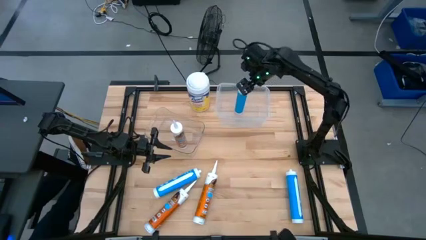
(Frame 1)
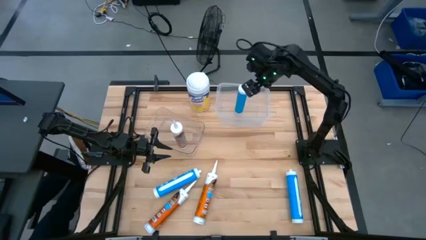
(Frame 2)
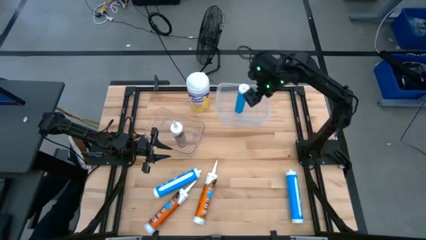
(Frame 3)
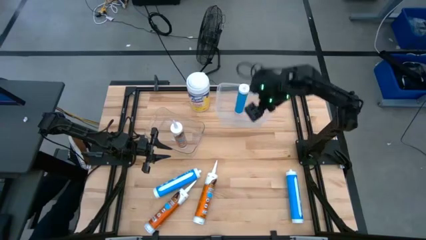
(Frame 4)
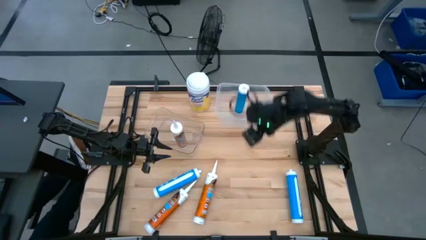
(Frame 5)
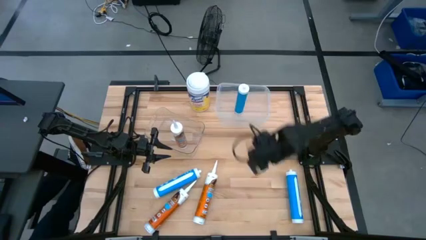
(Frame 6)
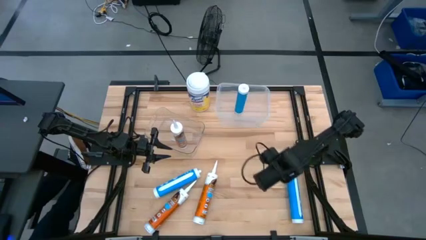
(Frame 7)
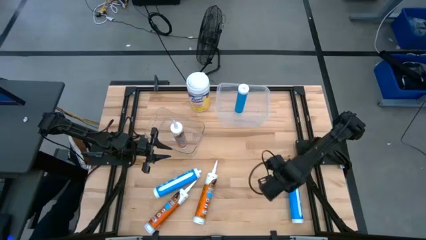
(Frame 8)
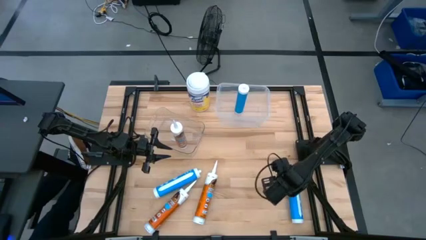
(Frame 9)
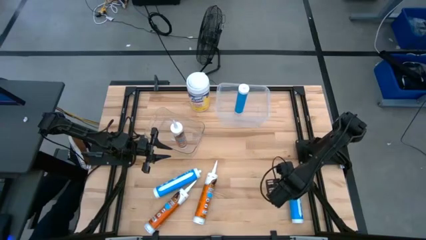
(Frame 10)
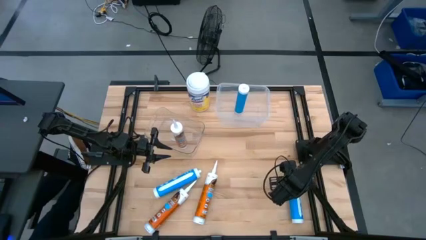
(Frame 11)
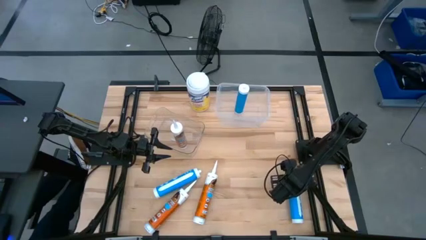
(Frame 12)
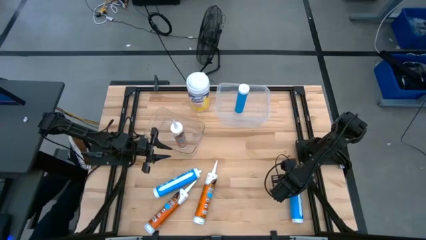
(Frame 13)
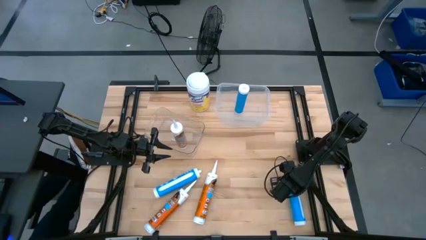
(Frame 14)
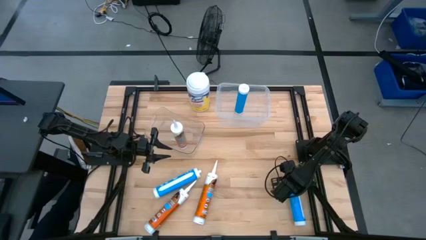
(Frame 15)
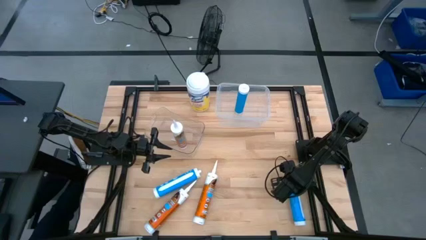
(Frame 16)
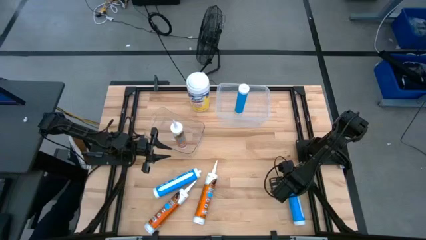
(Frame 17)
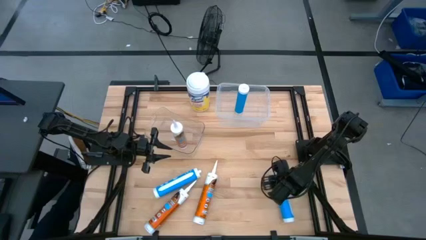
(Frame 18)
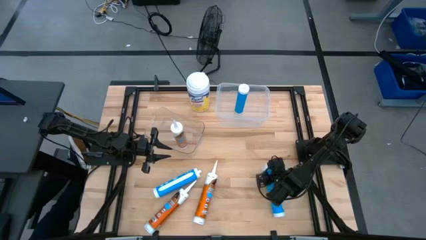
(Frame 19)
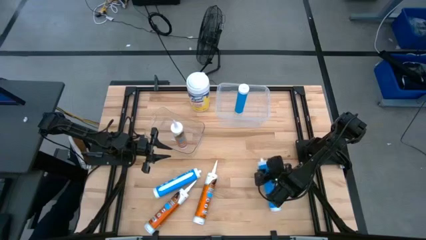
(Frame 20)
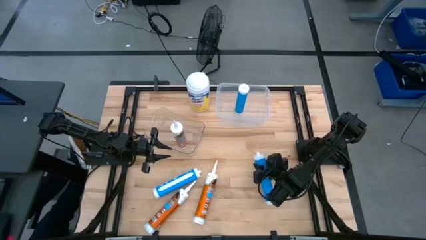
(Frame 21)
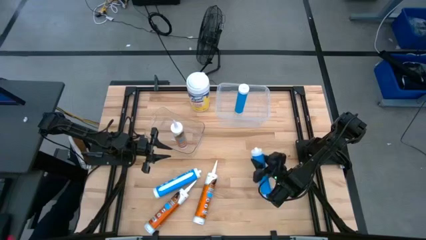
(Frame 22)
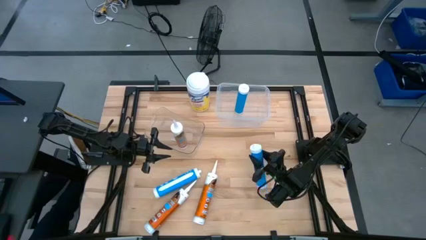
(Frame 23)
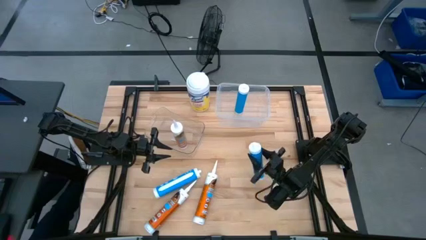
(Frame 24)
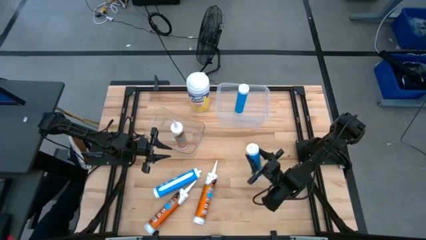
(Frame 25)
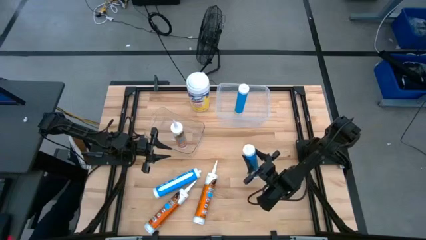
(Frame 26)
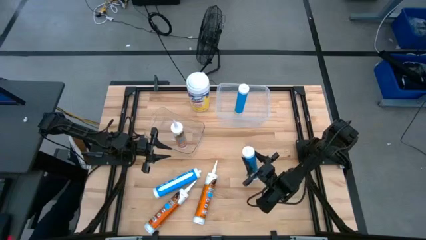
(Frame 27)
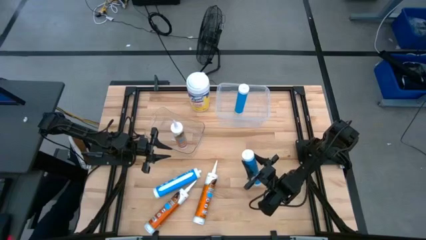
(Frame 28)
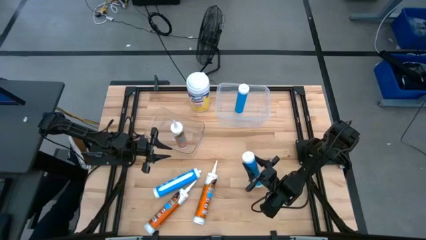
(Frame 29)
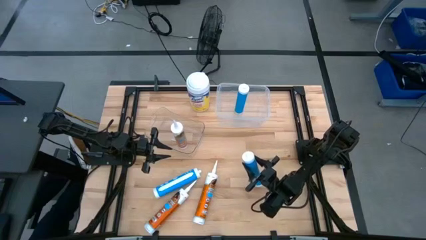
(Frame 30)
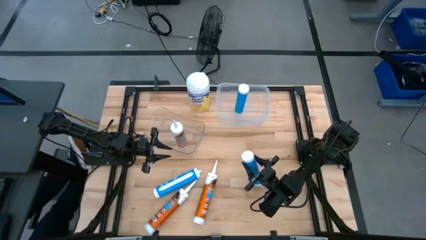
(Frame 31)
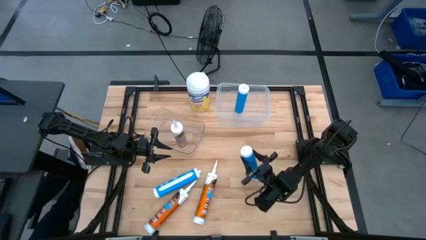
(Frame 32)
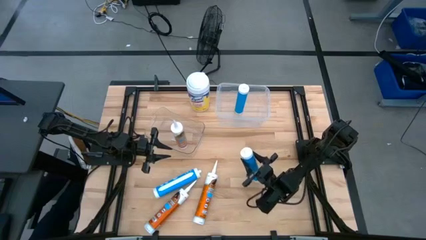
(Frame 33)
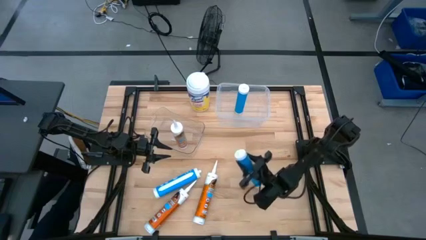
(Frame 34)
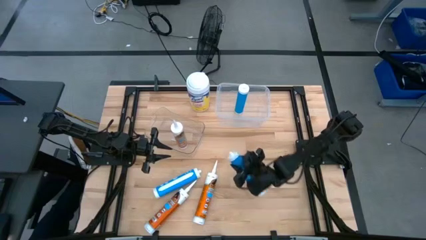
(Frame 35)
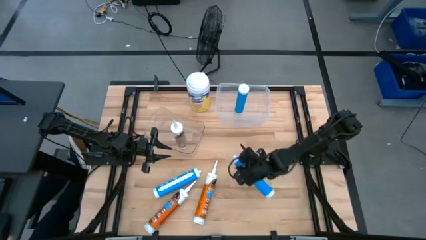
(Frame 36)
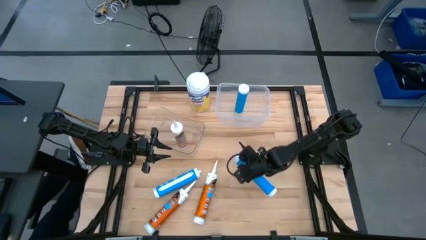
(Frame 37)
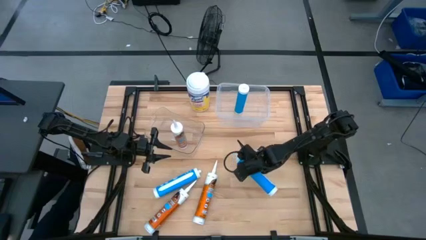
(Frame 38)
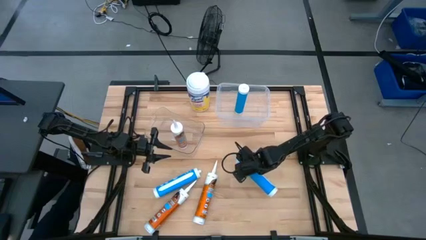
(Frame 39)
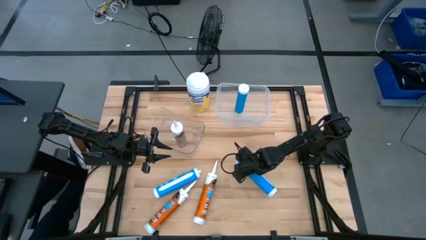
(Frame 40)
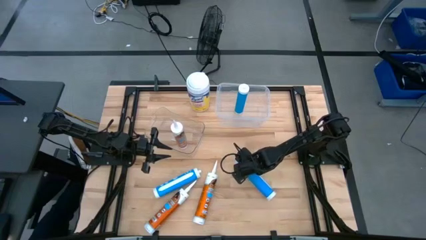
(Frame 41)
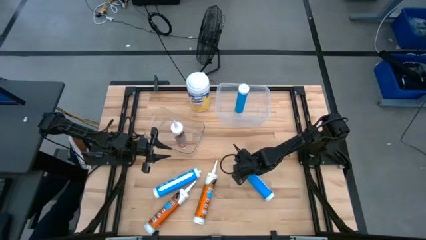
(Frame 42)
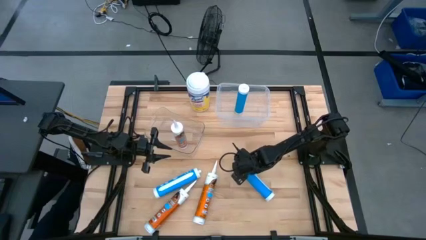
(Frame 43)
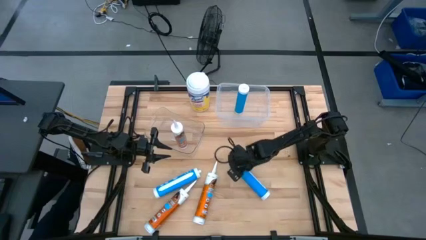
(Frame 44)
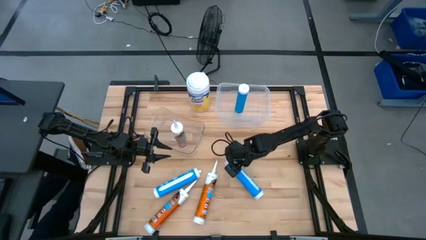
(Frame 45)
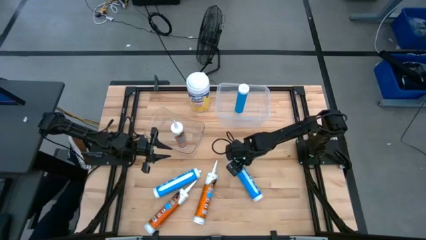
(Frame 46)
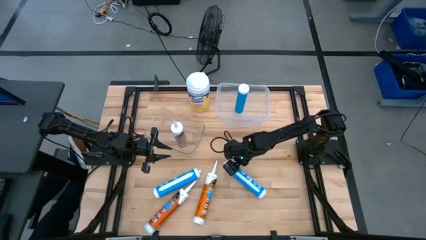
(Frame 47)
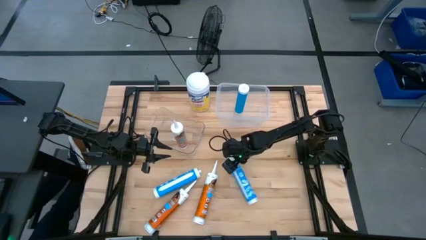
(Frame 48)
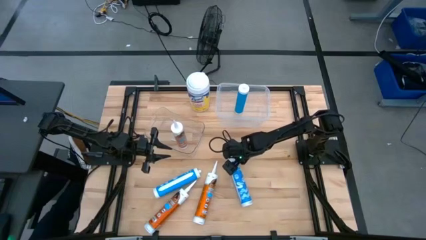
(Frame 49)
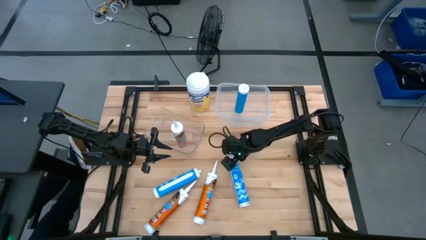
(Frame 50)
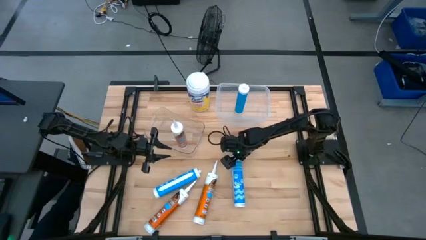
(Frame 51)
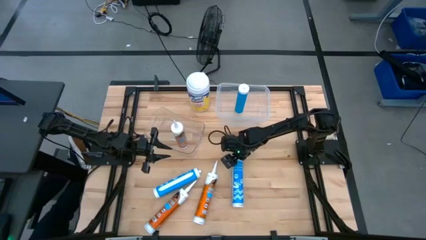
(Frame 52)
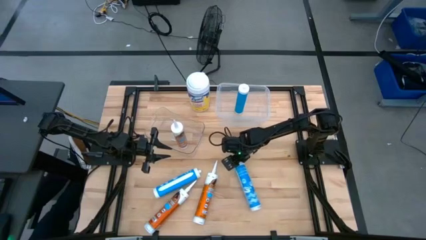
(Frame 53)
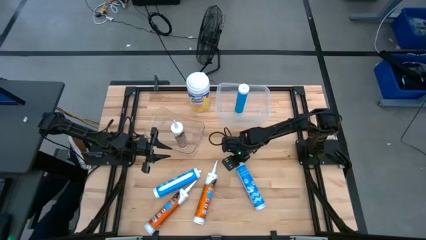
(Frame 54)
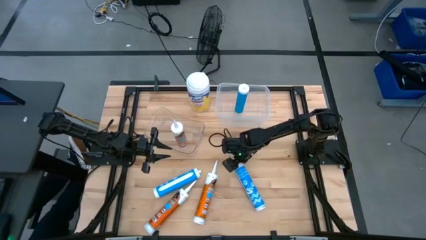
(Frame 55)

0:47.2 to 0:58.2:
Task: Pick & place silicon tubes, Sealant and Lysol wipes
Put the right blue sealant into the top transparent bin

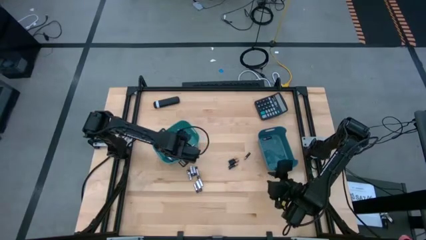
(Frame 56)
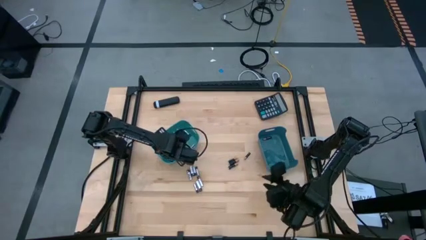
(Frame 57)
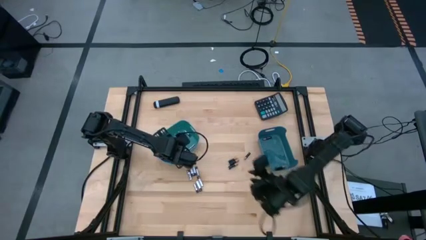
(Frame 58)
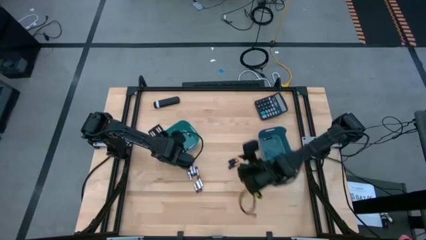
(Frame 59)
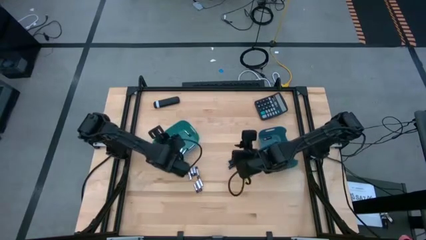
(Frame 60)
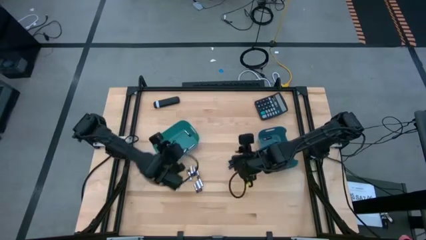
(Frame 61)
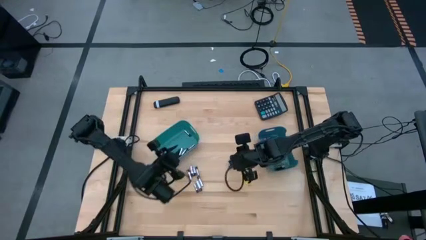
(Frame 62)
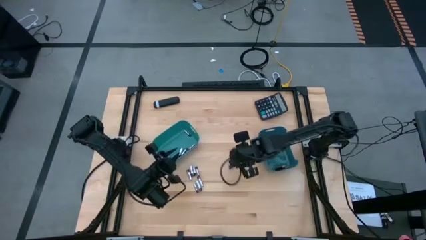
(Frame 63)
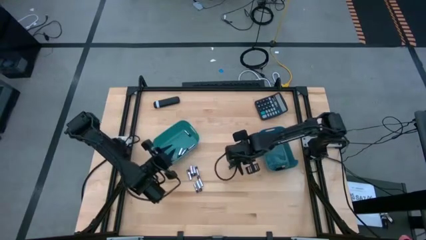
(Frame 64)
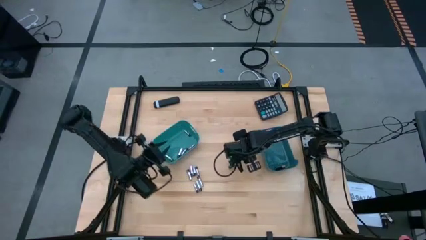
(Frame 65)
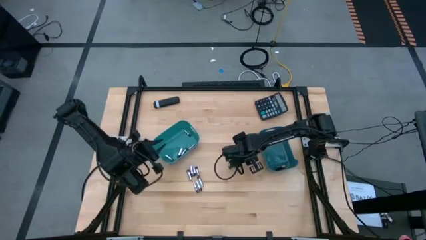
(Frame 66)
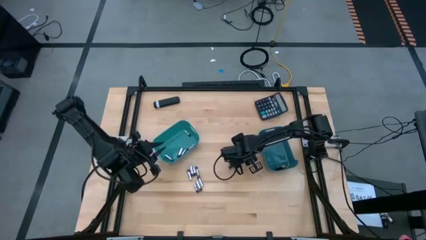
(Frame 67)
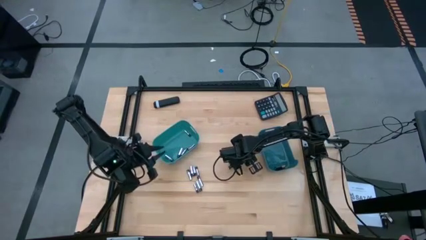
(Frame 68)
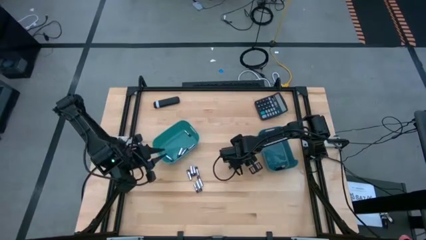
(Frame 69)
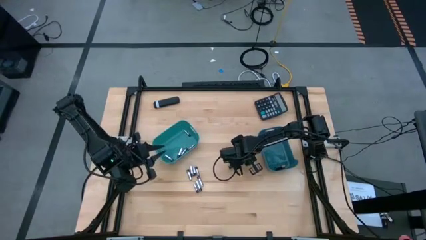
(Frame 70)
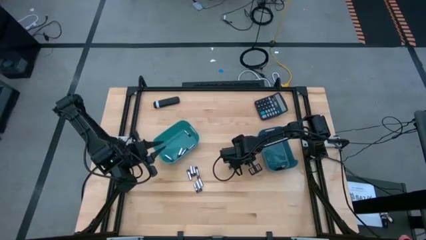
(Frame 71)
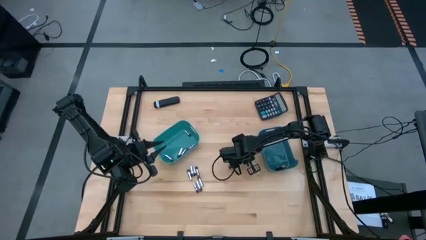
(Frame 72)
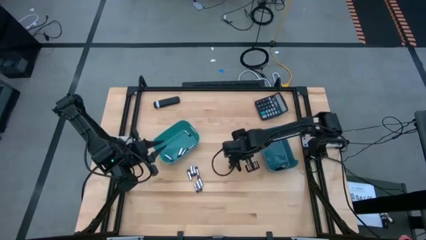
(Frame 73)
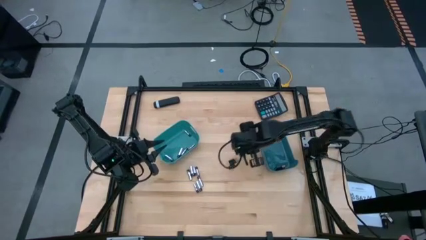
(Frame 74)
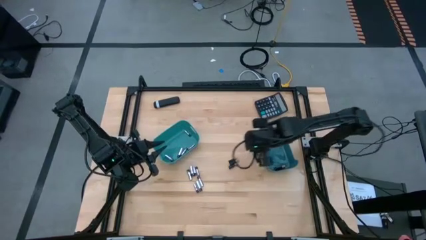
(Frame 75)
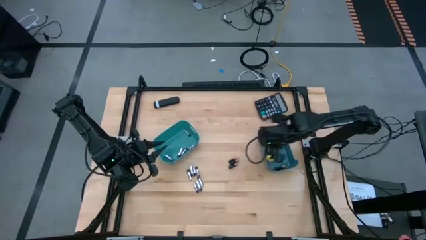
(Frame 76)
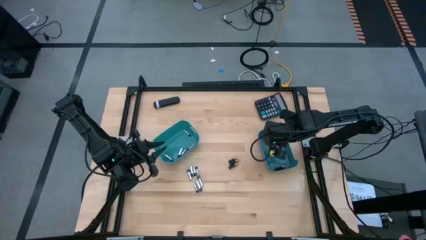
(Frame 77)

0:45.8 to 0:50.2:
Task: Sort batteries
Put the black battery into the blue bin

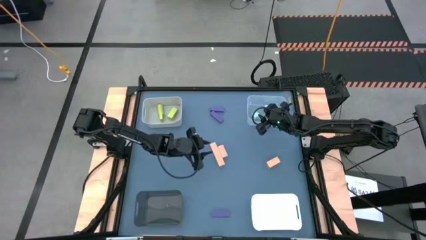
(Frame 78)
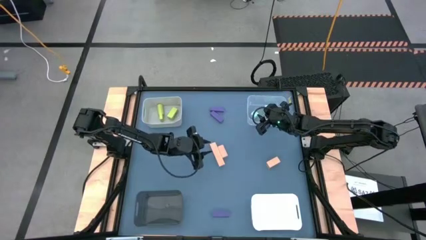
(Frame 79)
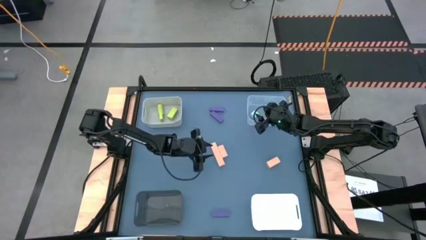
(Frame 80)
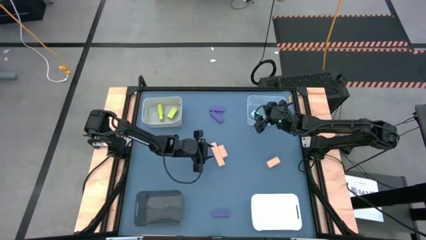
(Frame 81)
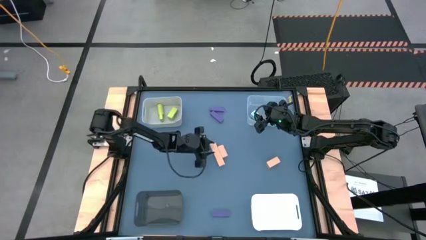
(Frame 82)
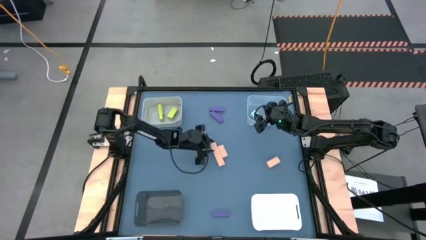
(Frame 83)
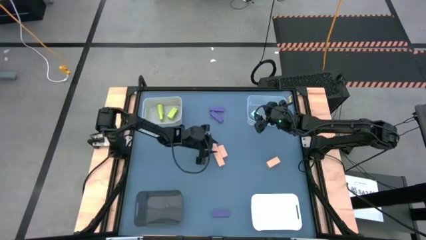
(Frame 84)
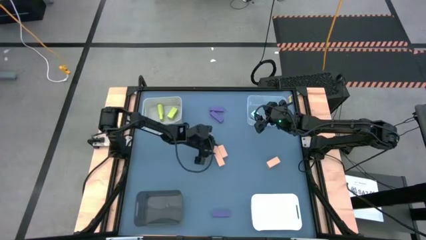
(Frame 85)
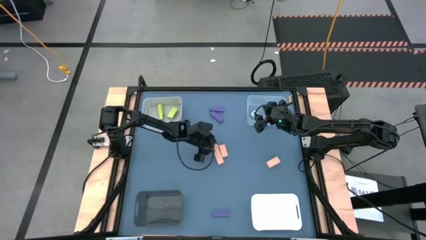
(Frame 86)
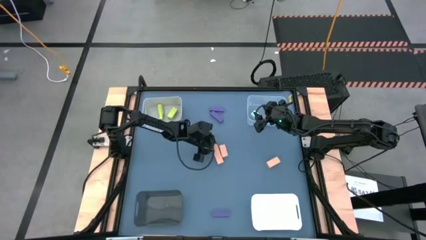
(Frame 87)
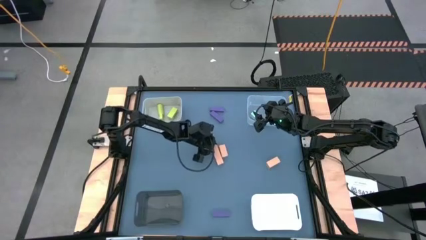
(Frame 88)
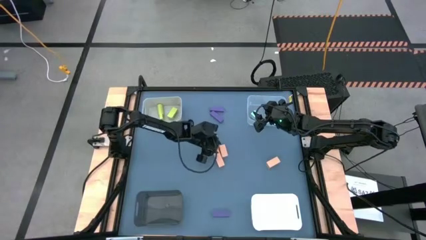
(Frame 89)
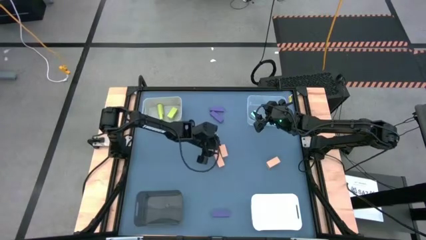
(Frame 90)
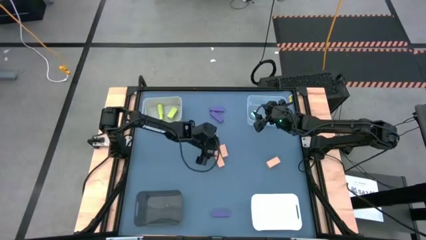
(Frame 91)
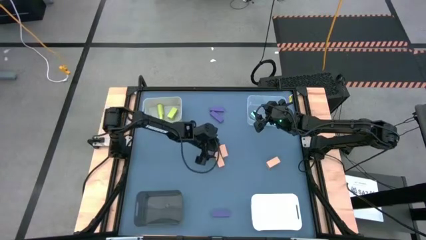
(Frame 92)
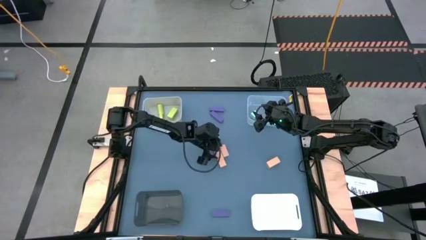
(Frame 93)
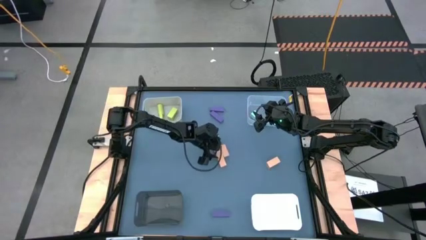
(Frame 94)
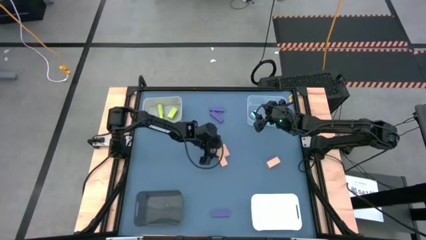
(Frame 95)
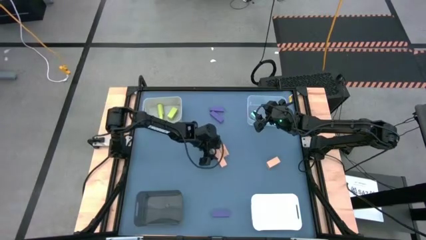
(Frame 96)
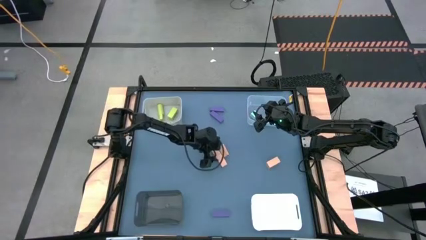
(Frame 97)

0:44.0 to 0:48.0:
Task: Sort & place blocks by color
Put the orange block into the black bin
